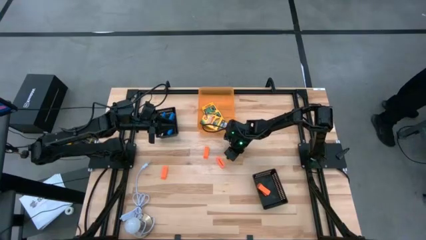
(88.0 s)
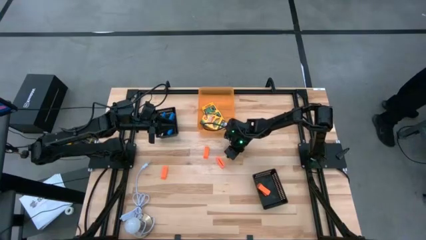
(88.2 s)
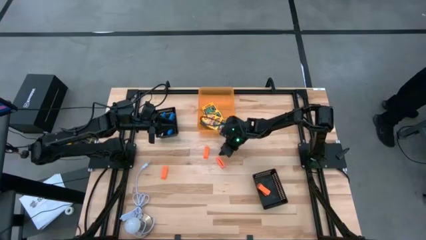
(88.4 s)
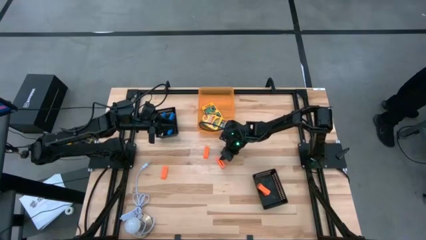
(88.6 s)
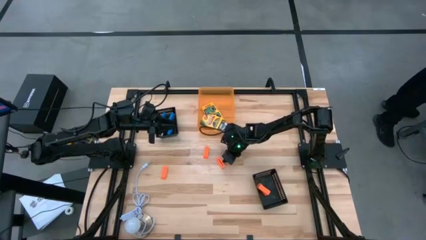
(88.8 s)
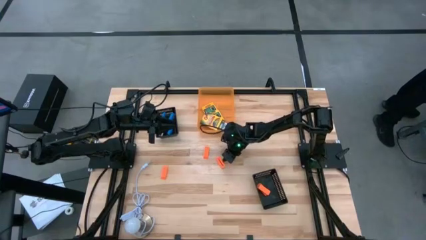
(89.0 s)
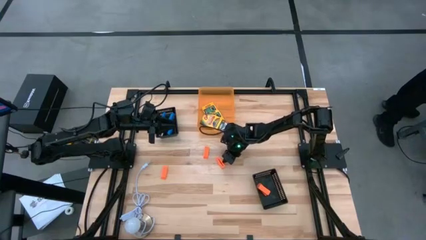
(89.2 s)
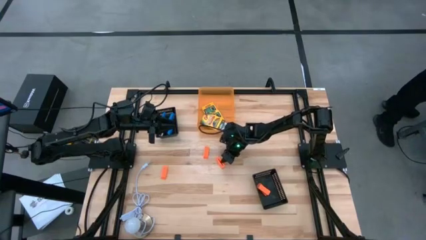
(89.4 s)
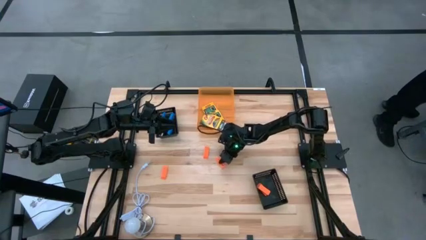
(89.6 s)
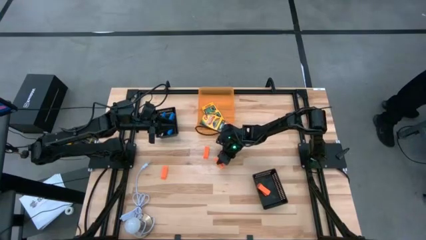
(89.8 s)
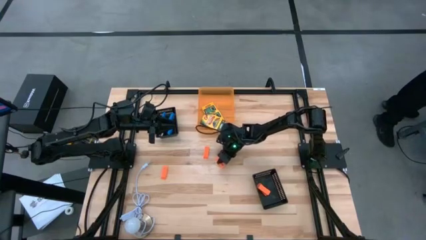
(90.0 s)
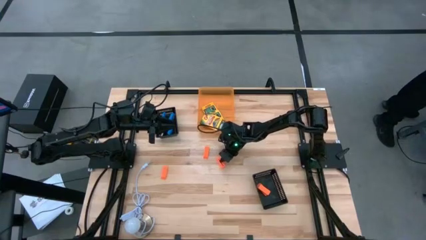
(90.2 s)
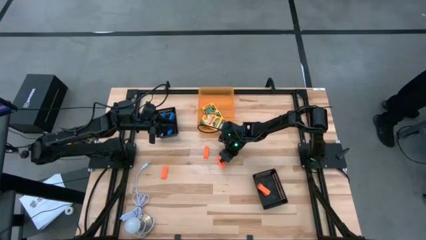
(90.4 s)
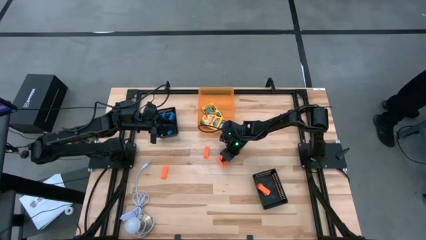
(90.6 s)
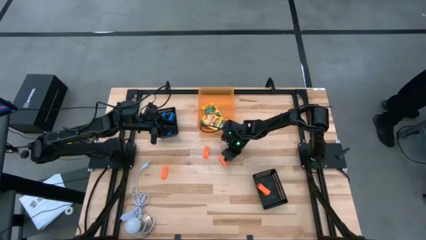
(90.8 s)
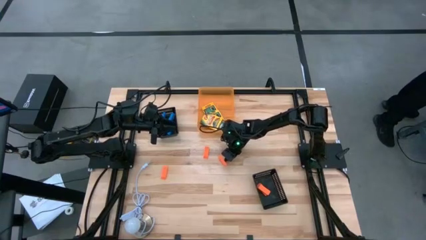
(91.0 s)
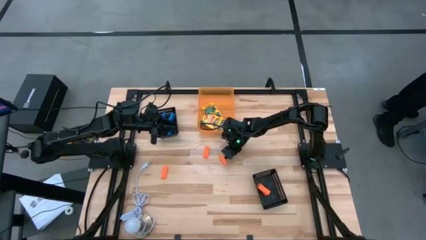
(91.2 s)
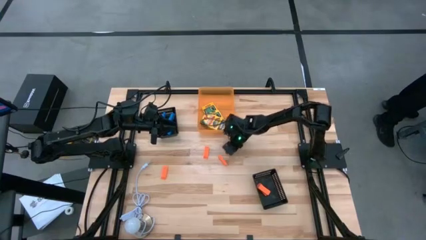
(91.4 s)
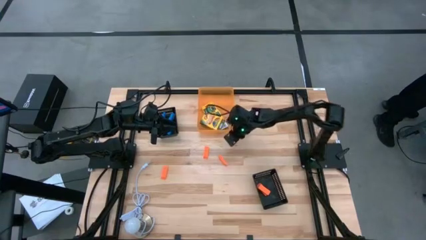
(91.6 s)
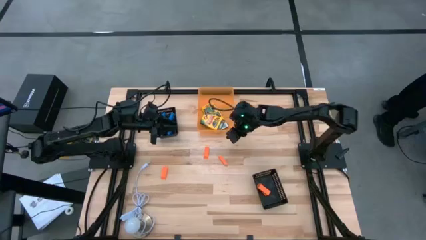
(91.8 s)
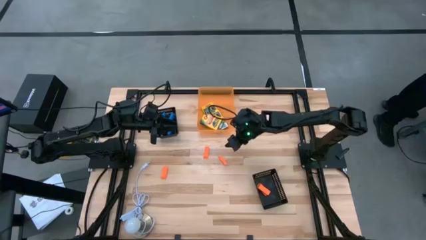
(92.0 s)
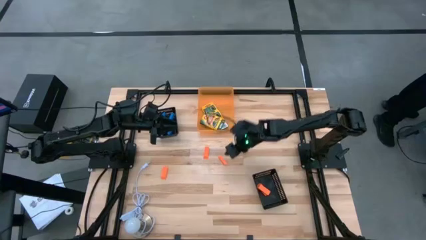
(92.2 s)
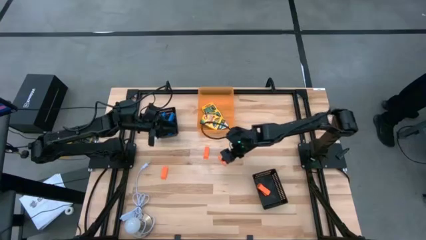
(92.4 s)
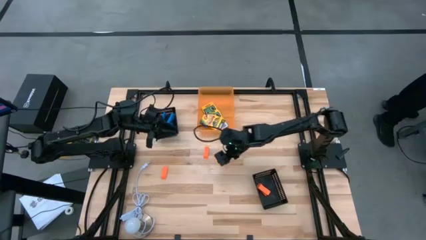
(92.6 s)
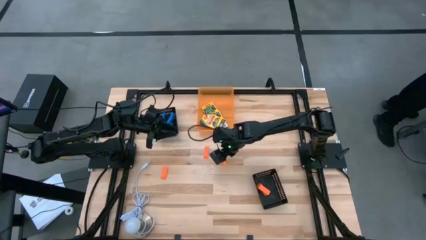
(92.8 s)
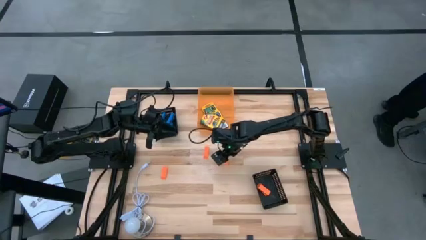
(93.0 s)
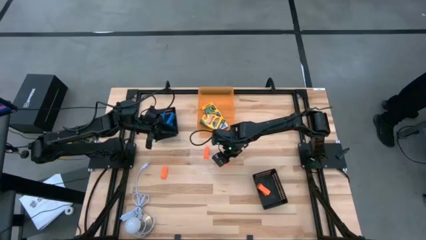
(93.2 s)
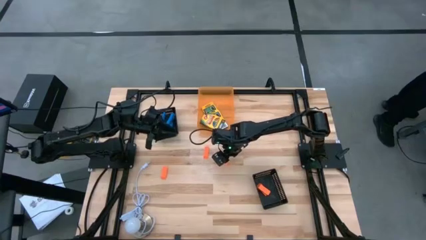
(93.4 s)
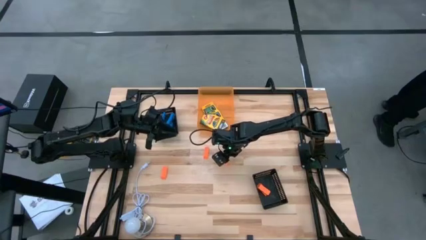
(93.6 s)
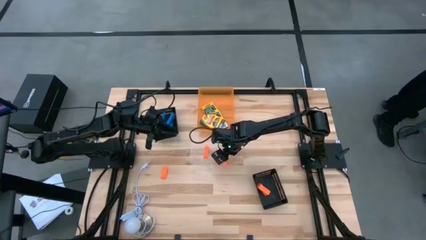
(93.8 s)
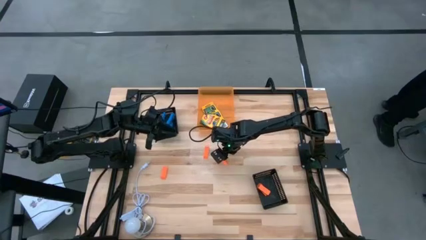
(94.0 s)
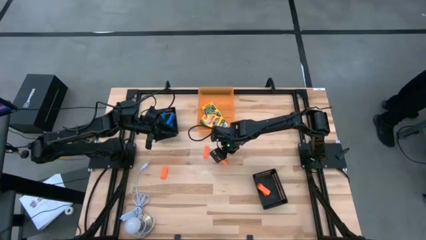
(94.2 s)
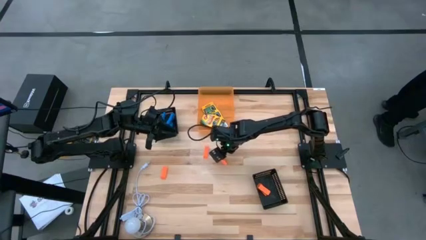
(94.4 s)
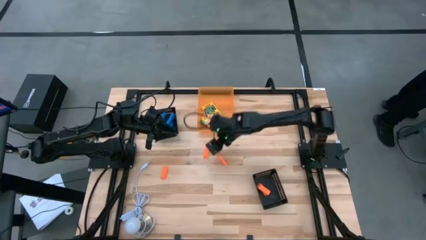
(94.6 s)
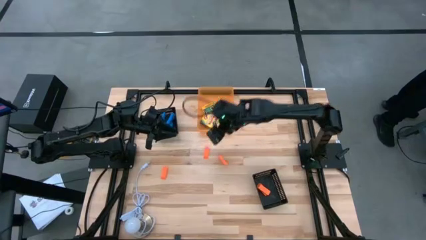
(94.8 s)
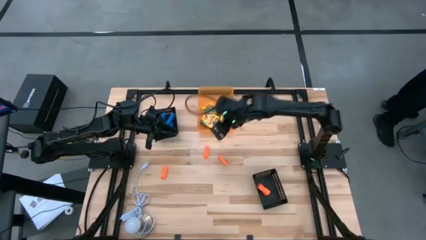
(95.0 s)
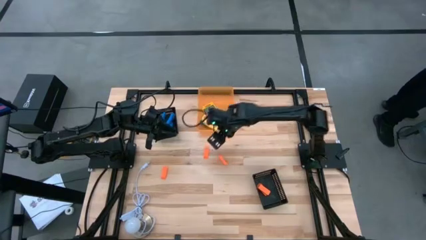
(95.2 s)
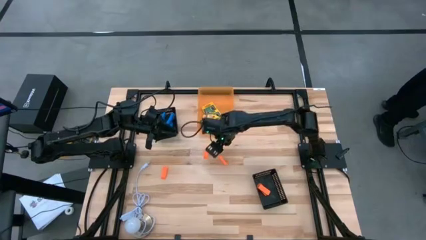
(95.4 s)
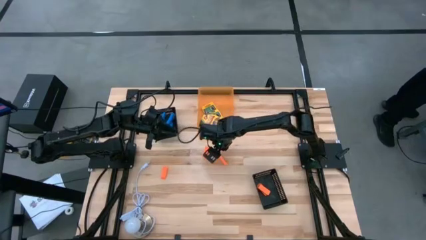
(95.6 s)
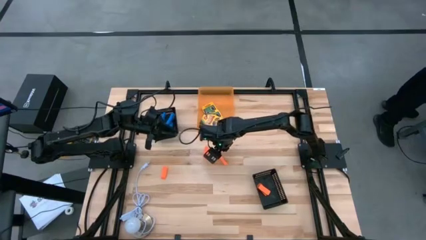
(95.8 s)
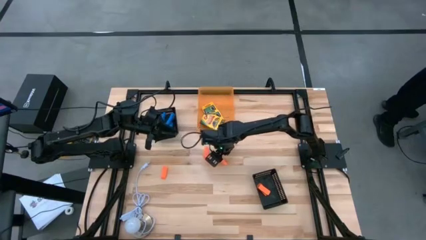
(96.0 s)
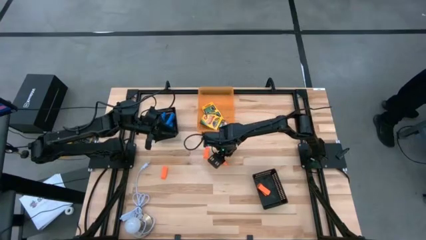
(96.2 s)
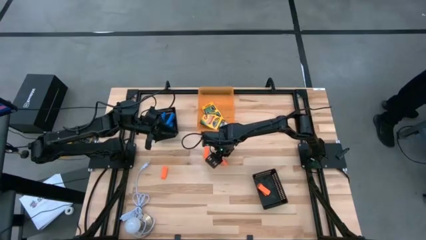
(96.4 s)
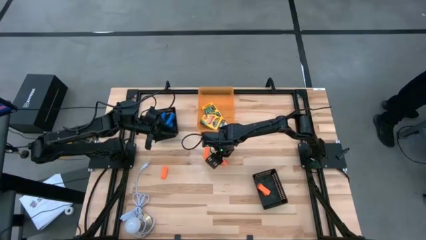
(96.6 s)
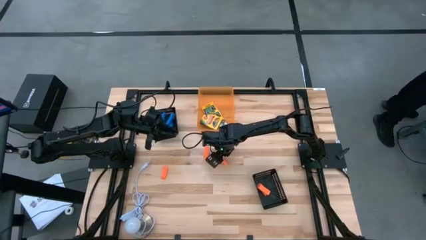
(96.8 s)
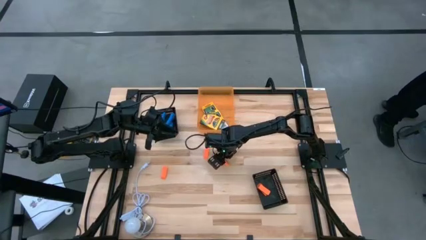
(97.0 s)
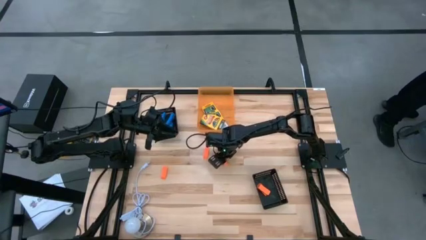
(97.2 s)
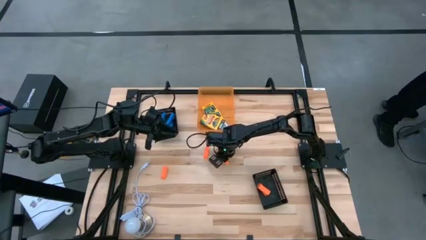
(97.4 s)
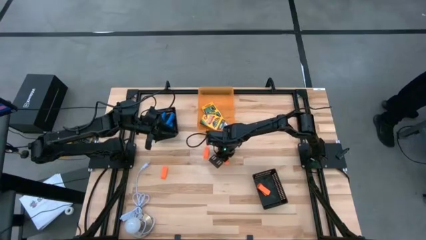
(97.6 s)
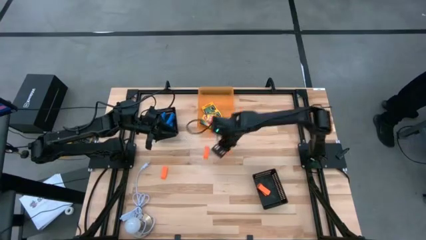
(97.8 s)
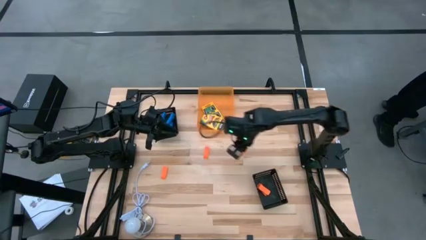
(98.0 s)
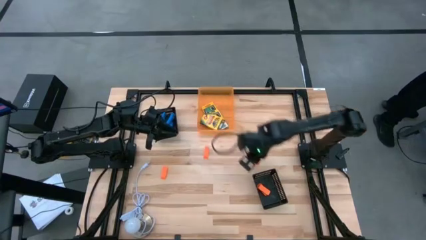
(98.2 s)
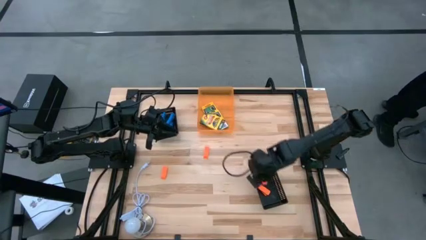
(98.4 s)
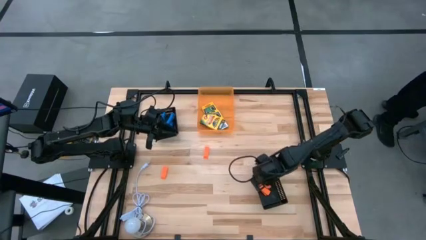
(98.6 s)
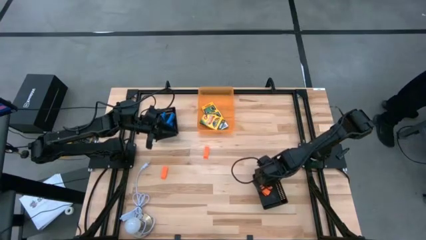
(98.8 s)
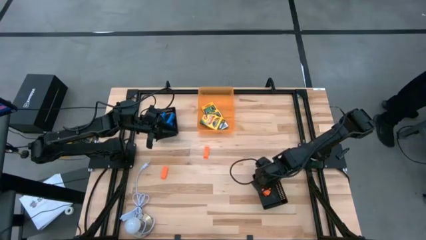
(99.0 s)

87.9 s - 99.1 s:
Task: Pick & Place School Supplies
Put the orange eraser into the bottom black bin

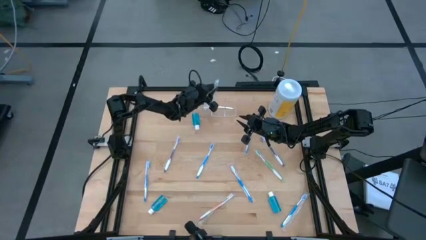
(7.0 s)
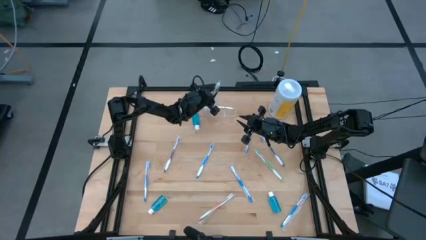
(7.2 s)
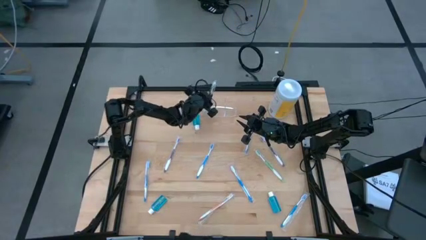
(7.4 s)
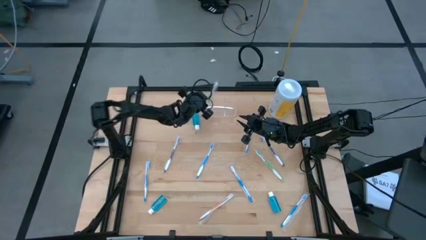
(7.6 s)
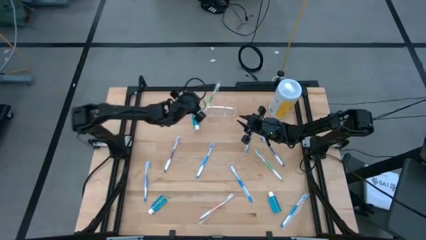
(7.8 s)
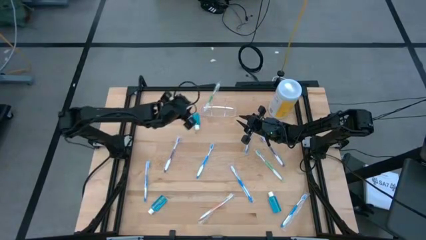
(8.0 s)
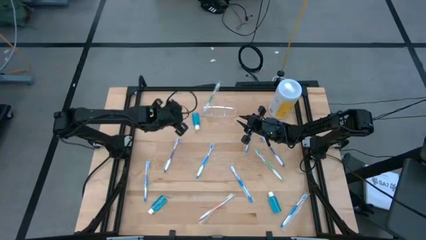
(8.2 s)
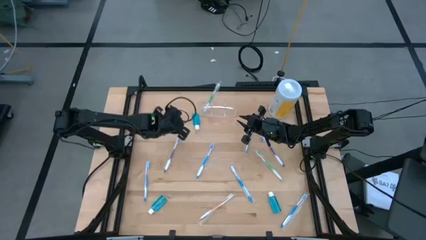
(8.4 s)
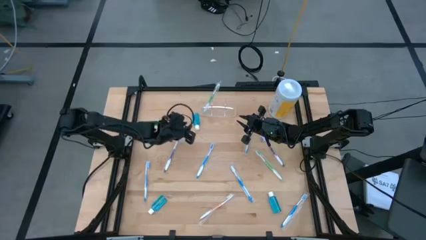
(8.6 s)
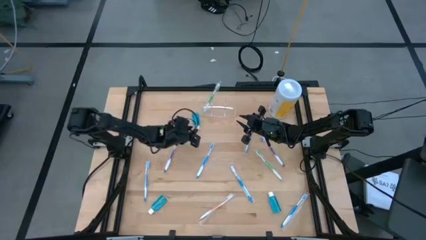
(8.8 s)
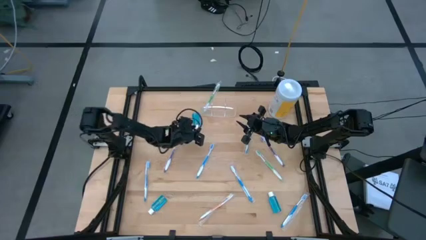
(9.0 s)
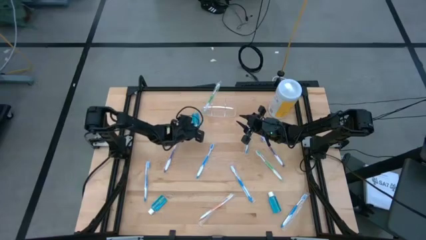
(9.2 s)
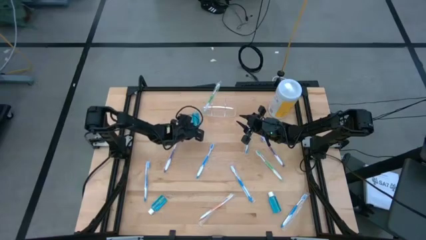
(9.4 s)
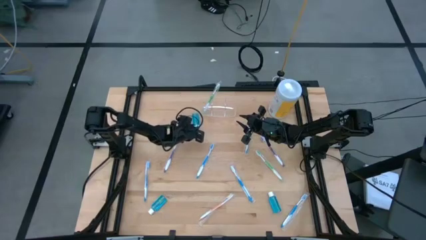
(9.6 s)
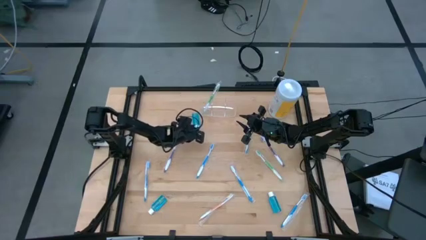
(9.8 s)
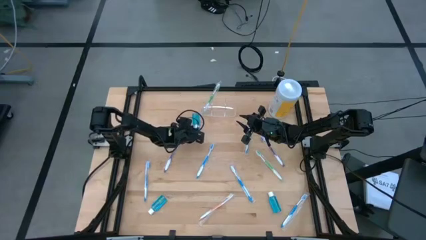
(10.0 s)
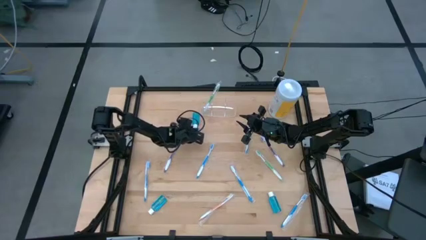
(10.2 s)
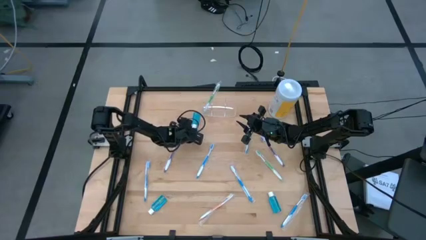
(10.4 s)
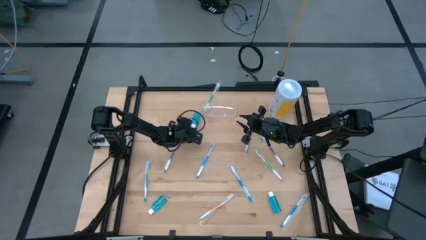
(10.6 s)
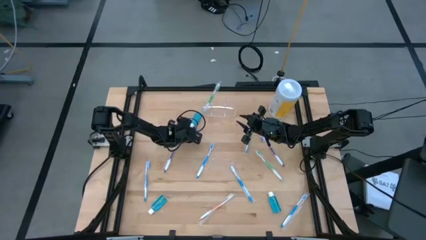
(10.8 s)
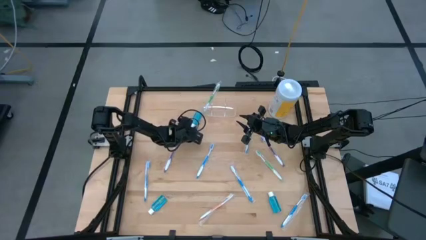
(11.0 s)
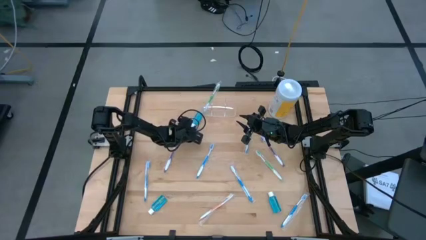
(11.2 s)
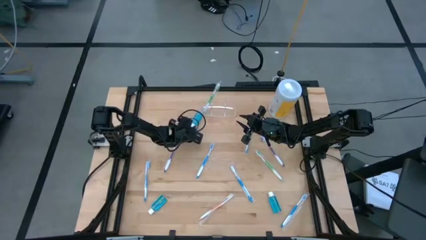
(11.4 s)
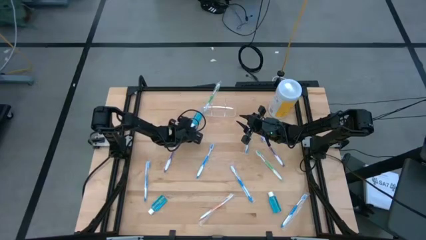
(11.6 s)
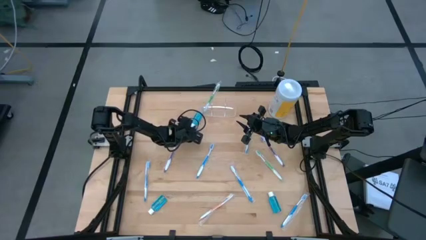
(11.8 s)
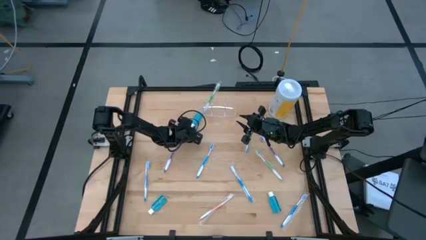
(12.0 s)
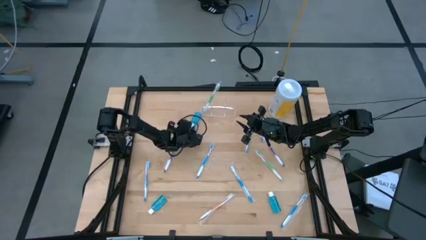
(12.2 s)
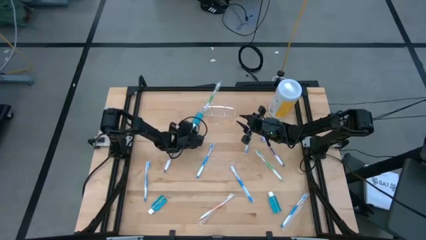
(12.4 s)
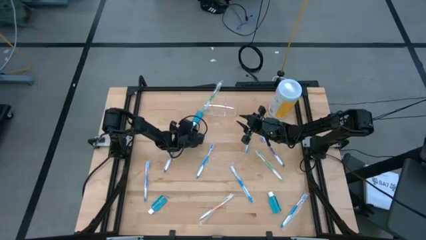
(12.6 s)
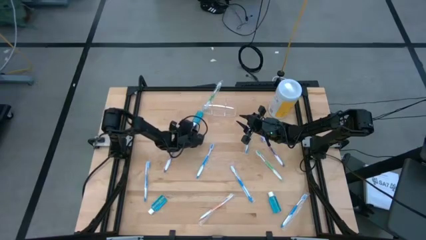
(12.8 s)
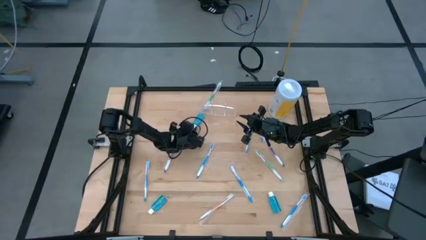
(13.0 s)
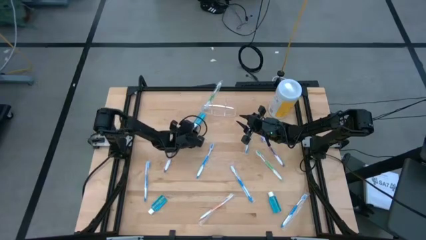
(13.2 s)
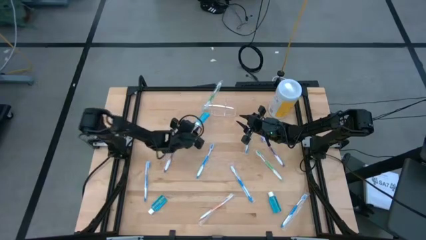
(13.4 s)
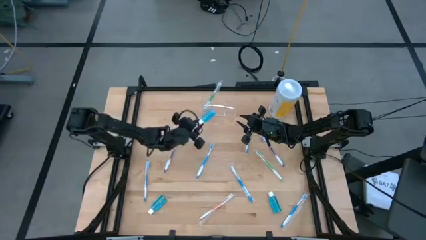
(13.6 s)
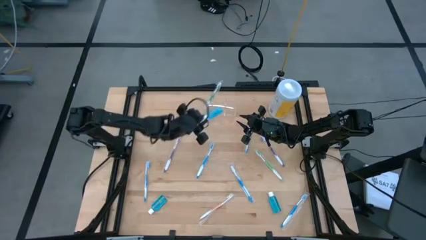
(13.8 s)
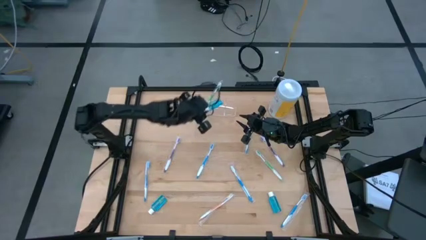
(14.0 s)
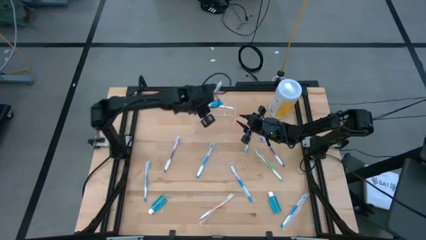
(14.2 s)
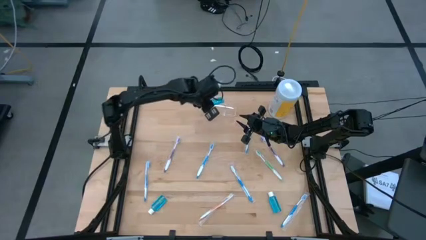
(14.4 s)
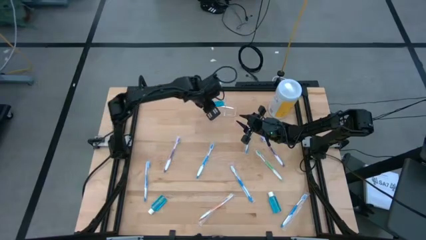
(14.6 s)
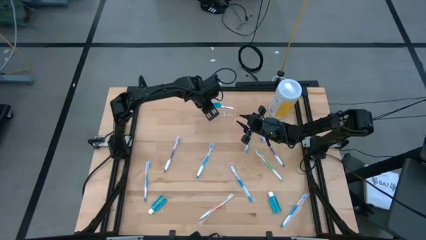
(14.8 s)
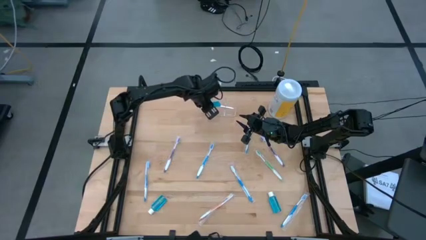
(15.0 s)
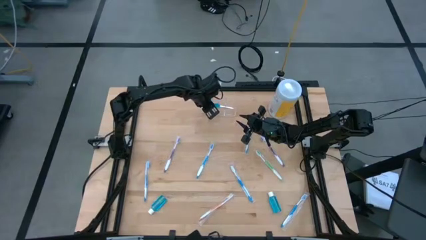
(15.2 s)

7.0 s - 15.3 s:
Task: Pick & Place toothbrushing station
Put the mouthwash into the transparent organizer
